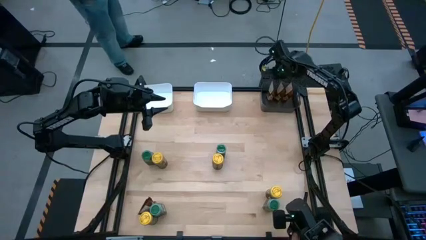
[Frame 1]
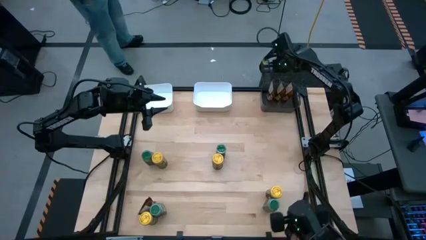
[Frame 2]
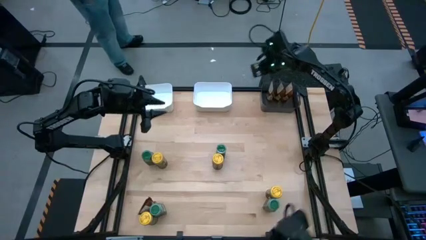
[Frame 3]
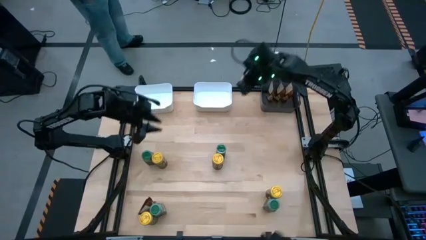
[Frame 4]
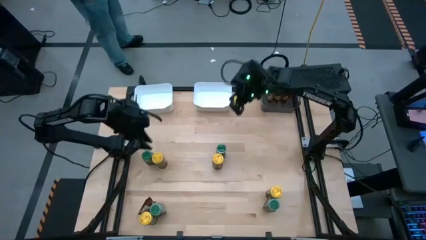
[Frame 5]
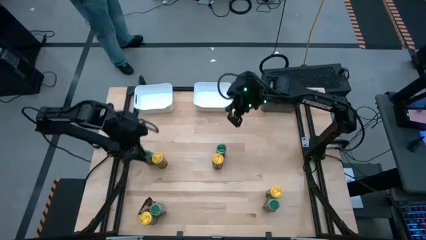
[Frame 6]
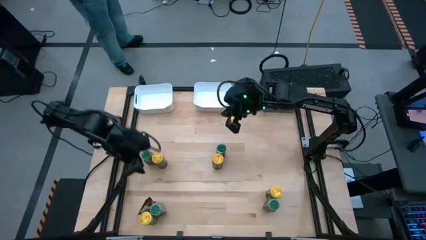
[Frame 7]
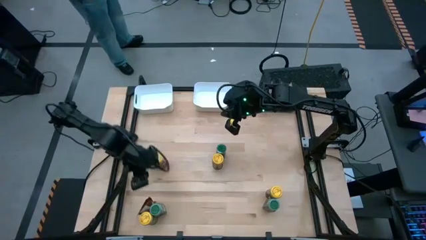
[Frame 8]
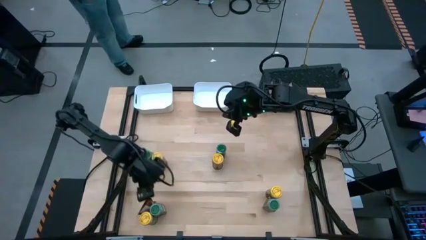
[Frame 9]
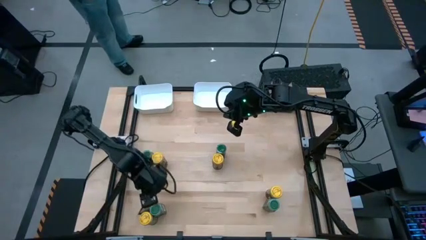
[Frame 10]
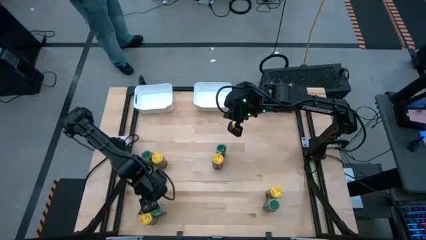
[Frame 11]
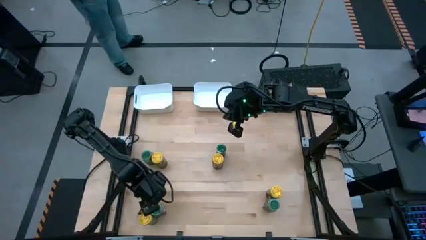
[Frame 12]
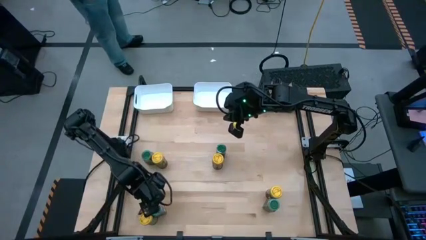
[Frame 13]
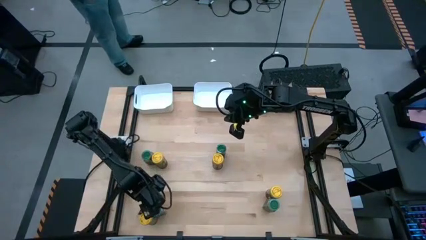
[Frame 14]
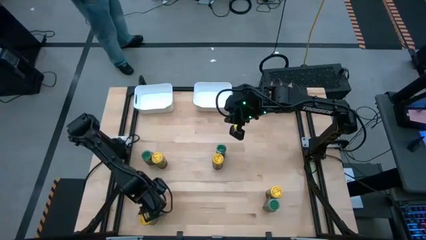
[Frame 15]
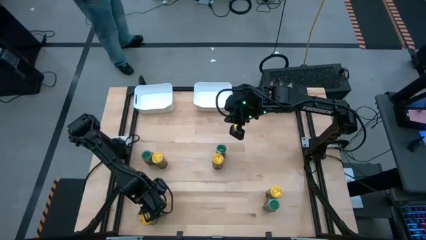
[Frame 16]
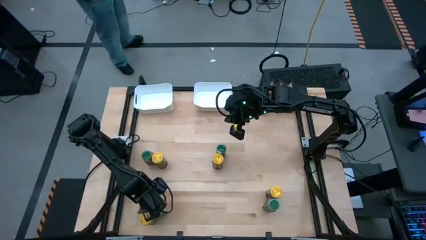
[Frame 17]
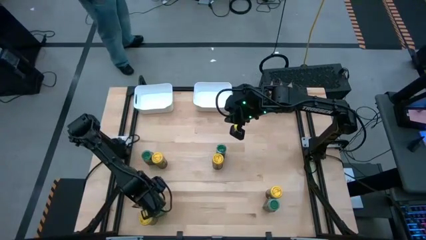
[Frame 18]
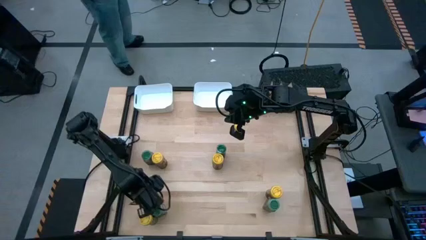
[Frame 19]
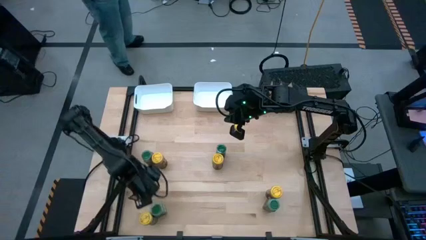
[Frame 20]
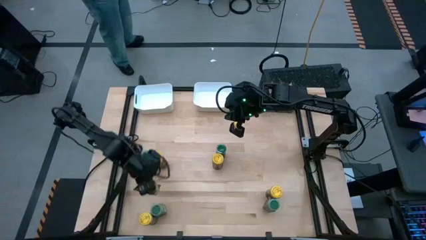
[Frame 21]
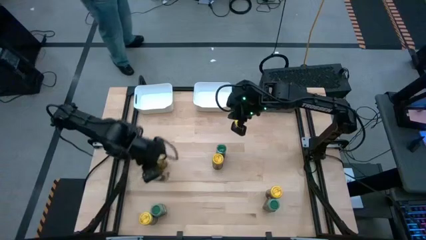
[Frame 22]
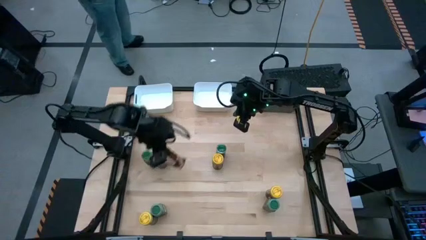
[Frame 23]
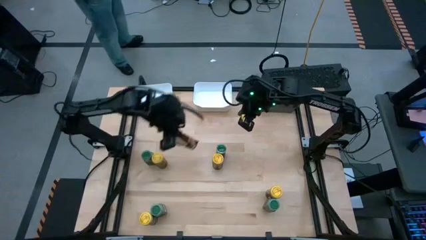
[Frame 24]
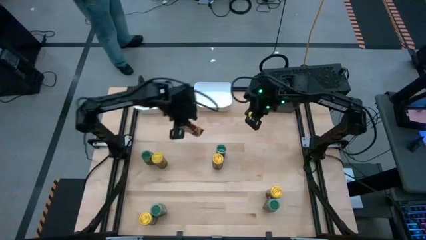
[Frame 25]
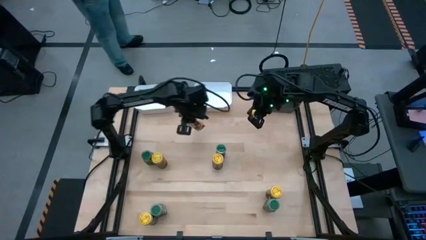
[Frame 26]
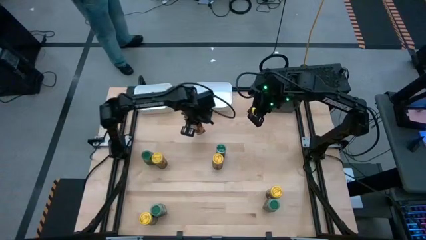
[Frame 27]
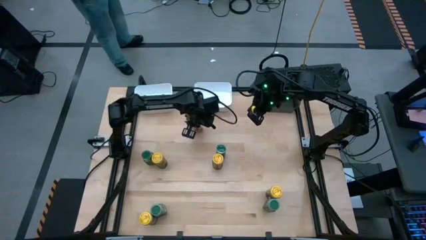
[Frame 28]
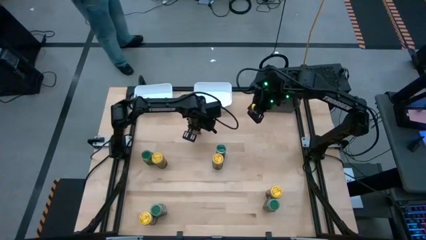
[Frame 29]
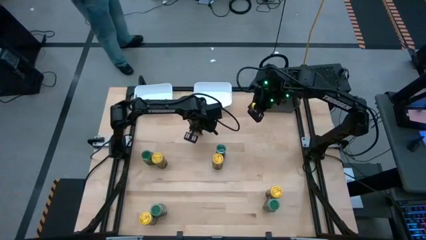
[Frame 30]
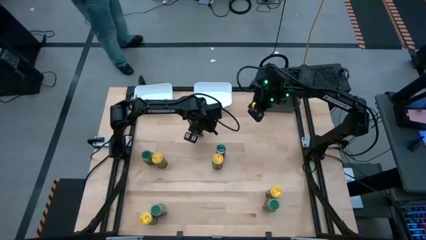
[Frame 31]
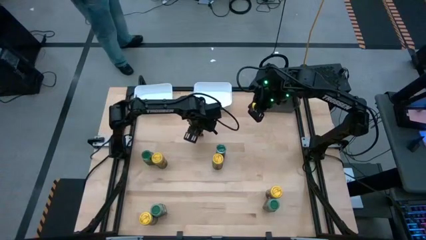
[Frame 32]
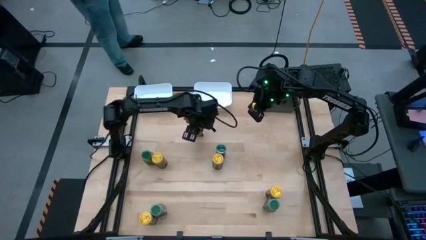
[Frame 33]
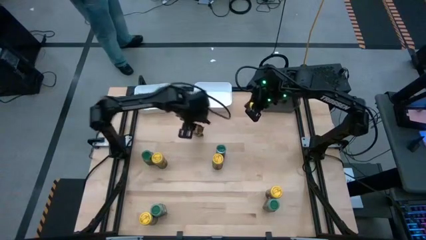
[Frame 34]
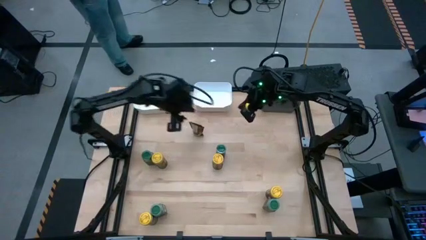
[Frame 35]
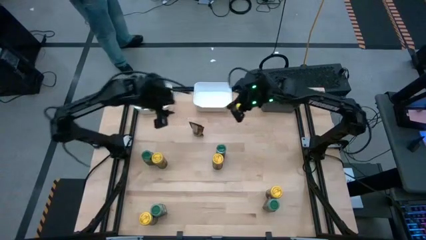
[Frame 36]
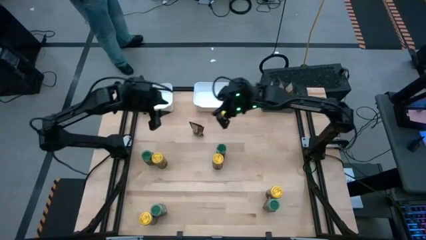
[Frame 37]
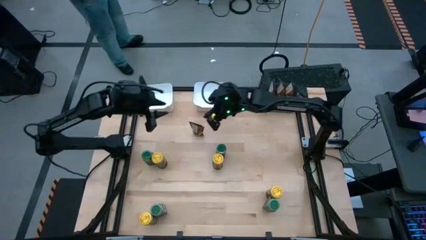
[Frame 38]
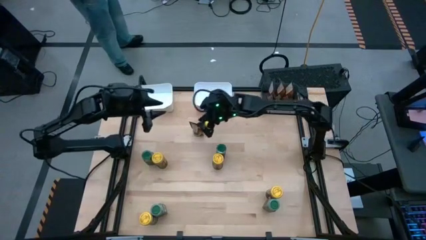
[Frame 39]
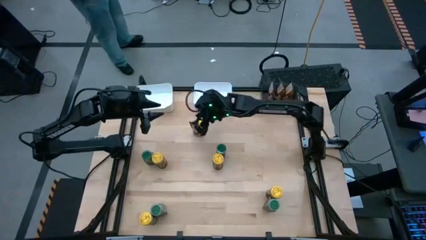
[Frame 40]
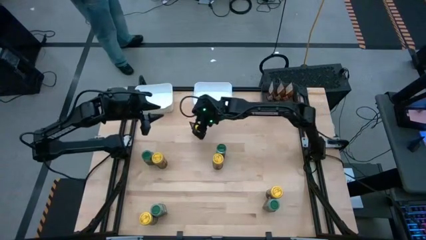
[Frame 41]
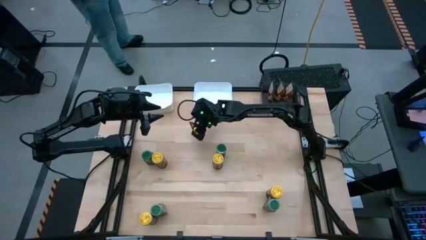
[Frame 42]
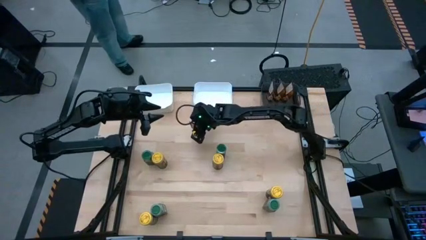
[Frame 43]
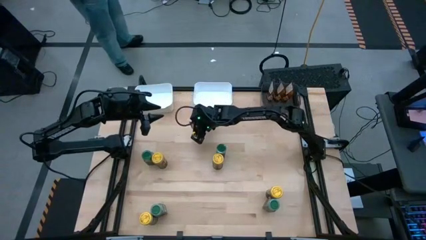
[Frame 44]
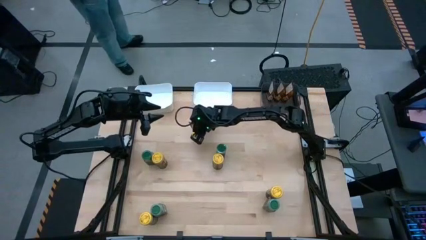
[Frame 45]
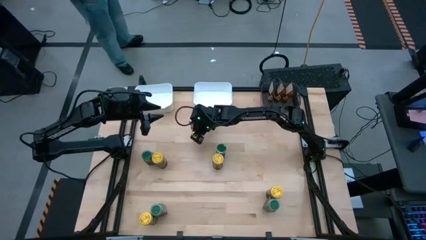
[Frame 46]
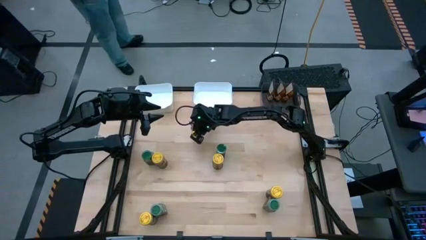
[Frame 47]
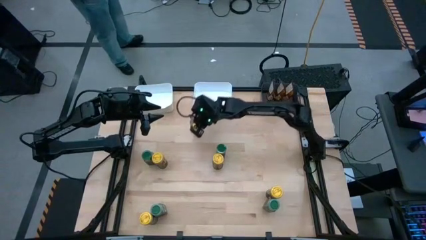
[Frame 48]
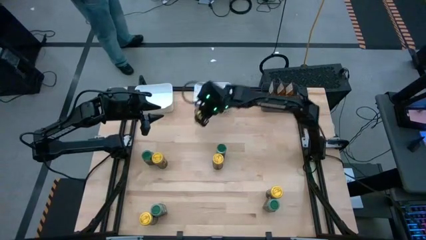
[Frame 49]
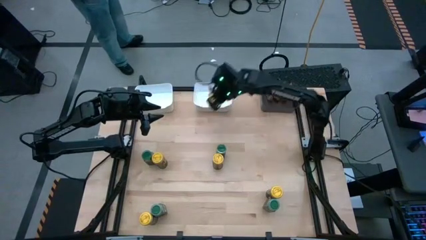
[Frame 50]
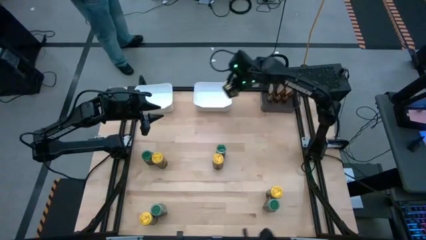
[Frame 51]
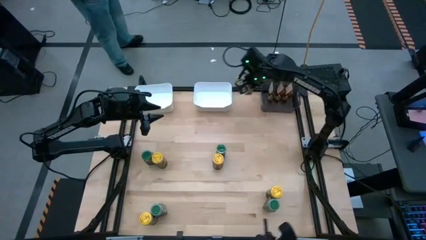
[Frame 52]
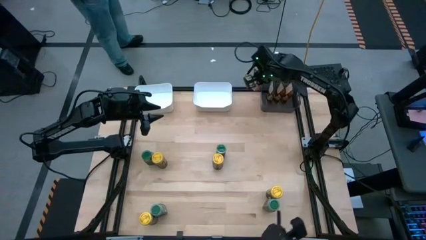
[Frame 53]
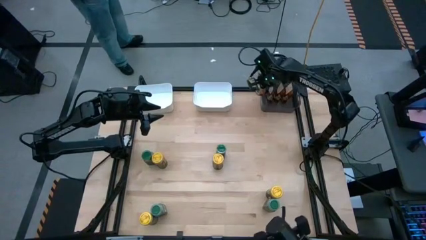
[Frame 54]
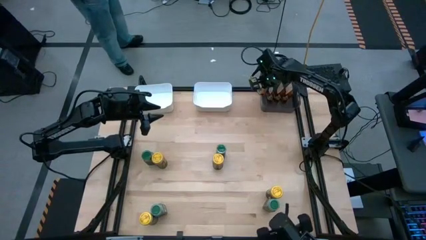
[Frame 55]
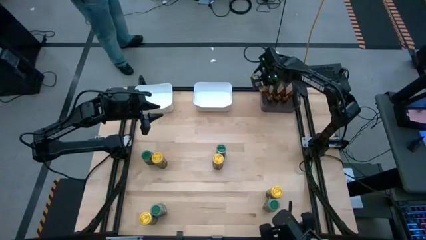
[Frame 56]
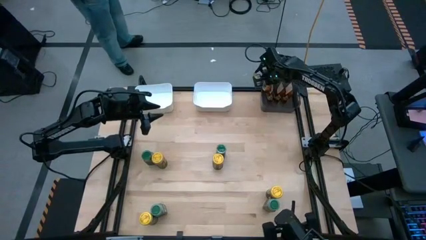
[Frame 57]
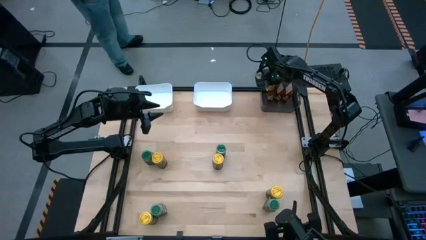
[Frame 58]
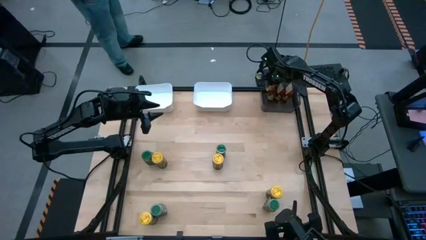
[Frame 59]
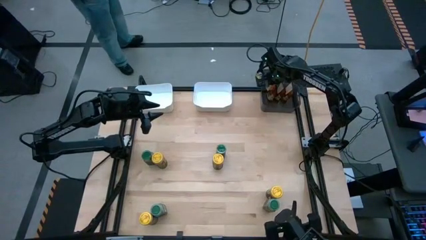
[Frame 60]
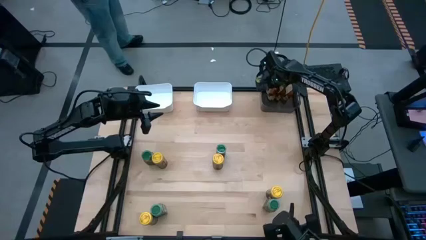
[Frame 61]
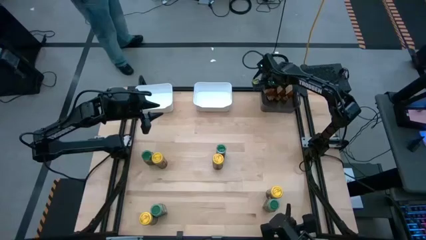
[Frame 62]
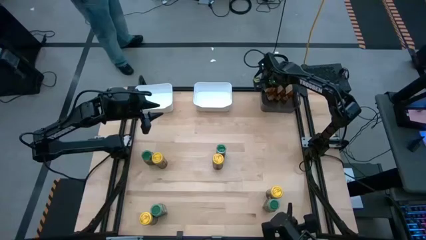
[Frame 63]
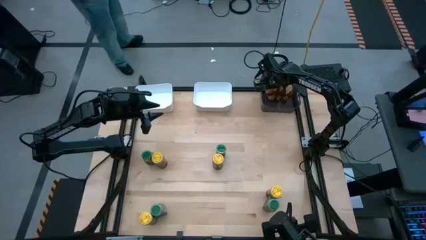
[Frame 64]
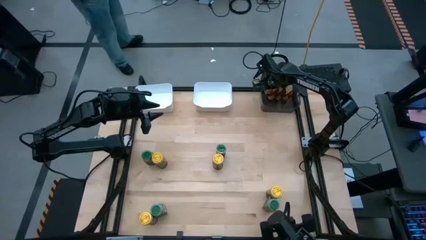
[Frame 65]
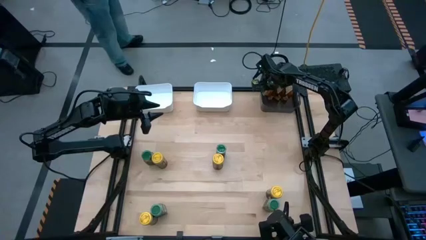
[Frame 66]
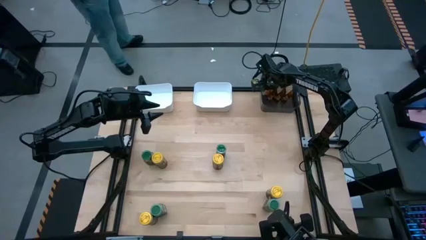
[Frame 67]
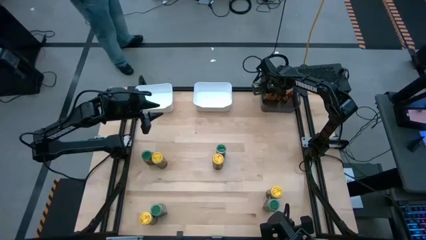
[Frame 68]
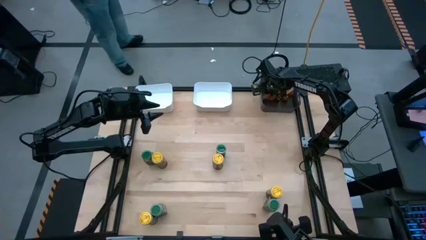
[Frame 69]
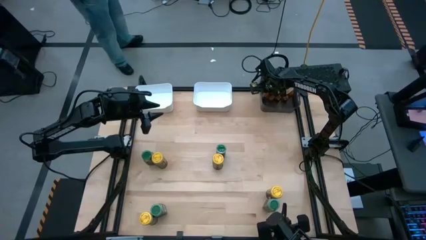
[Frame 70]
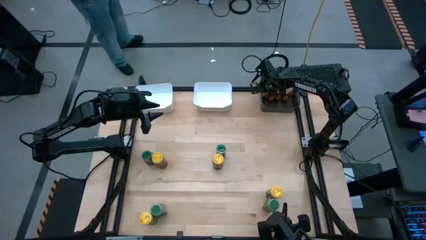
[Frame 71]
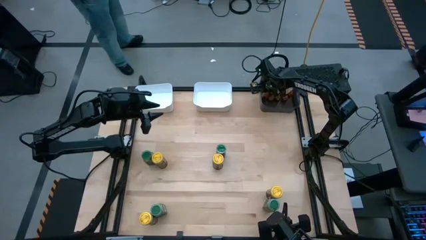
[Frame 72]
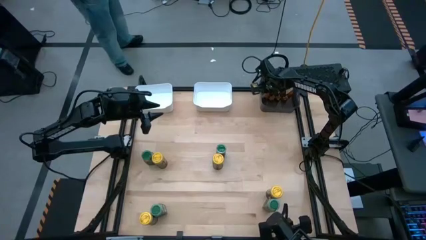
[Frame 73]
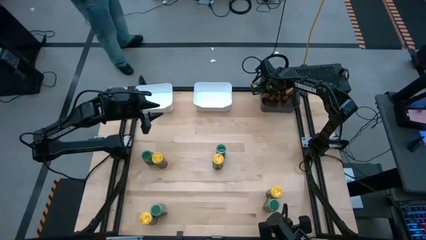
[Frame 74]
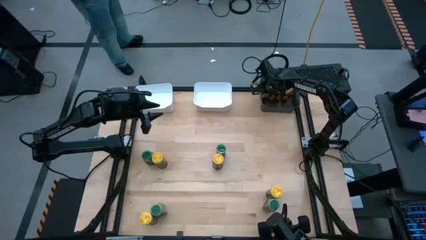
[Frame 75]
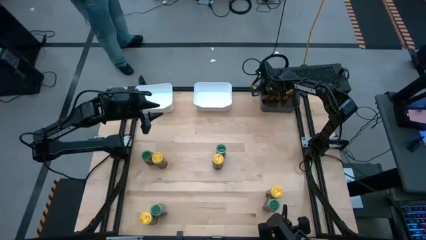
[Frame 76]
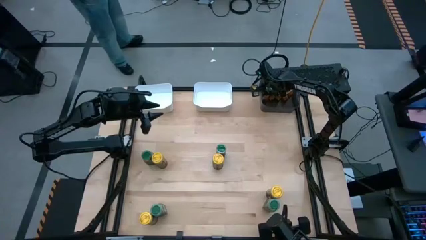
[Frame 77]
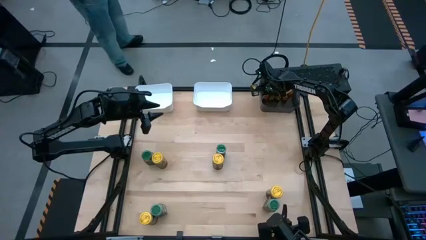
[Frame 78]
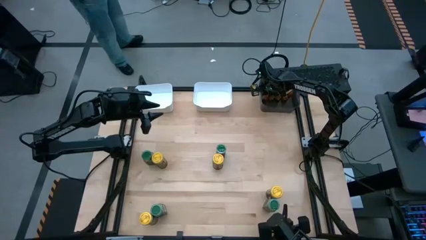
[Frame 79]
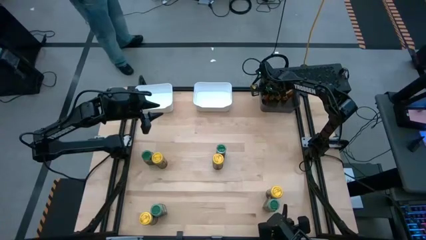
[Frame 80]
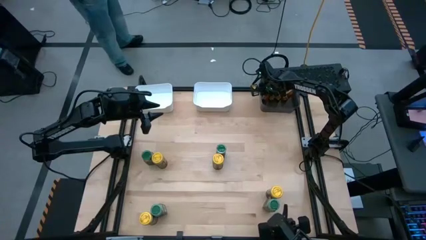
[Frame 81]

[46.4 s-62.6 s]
Task: Sort spices by type
Put the orange seasoning bag into the black bin

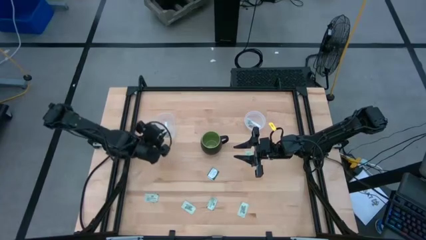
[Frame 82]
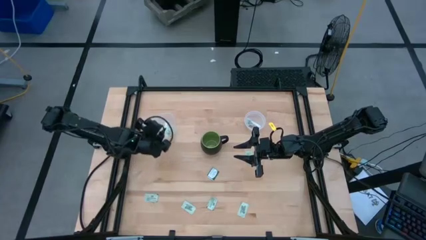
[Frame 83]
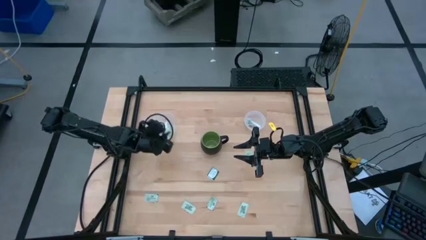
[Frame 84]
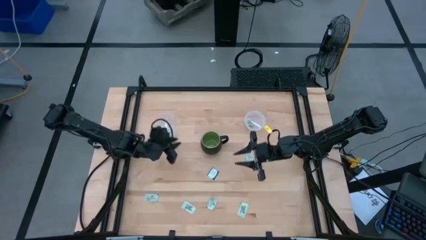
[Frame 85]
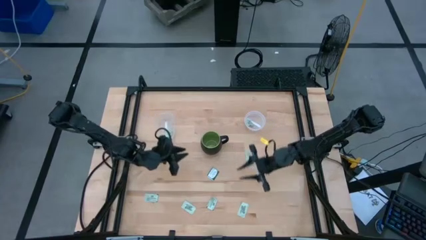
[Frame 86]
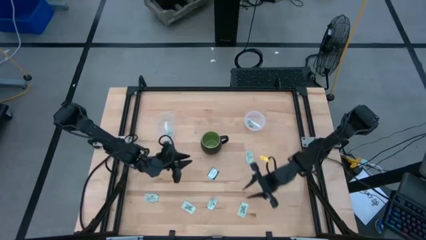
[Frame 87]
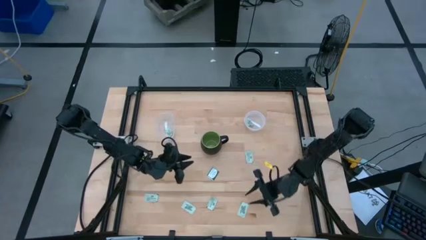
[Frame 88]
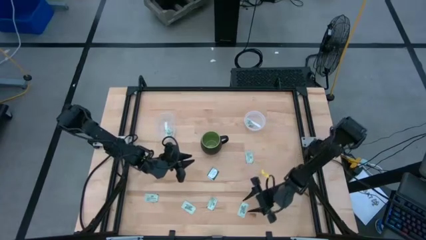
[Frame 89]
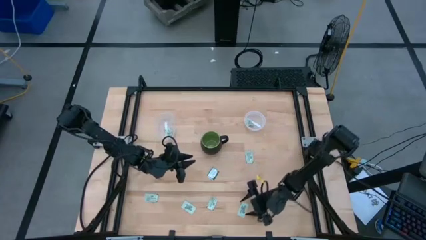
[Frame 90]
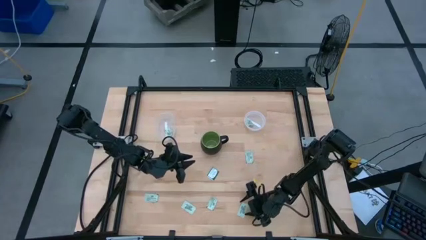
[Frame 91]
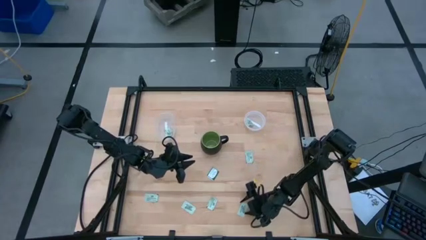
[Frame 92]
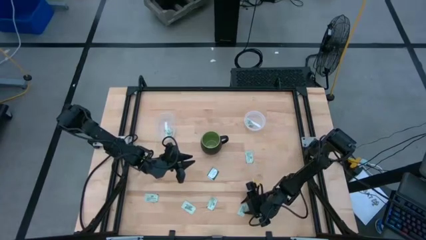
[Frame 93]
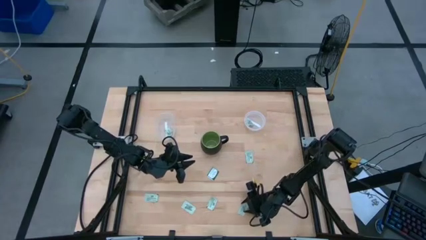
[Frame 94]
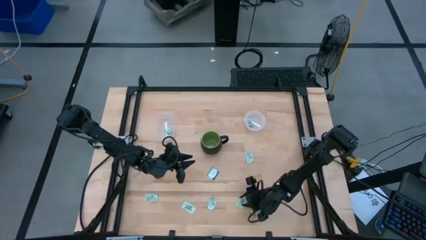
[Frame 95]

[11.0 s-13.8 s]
Task: Pick and place items into bin
Put the green stevia packet into the right transparent bin
